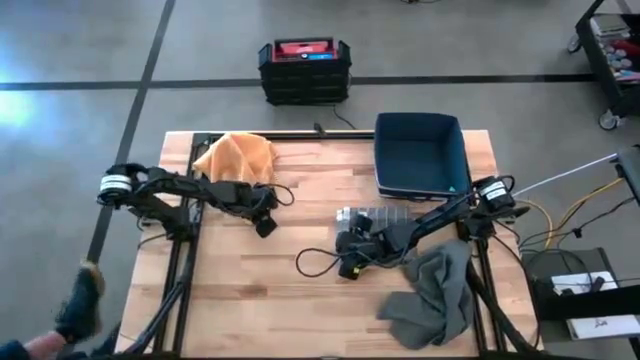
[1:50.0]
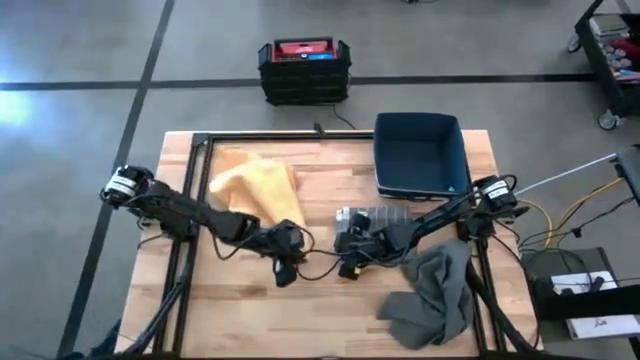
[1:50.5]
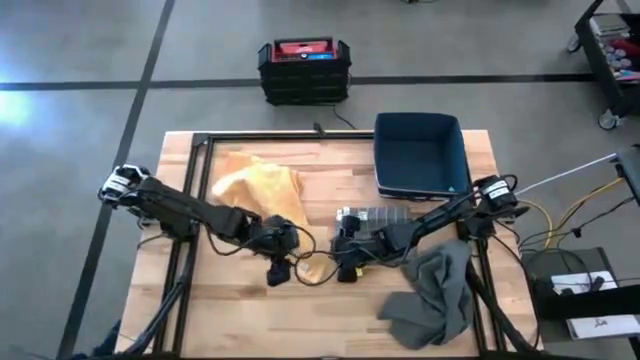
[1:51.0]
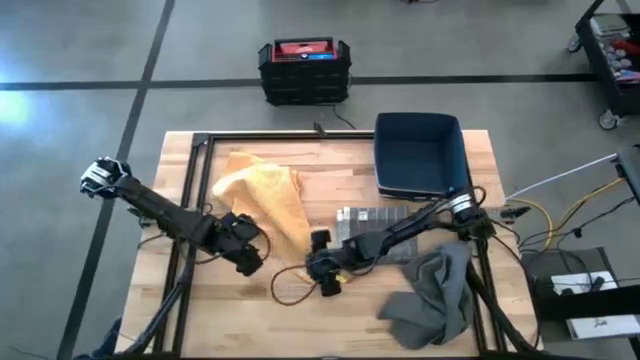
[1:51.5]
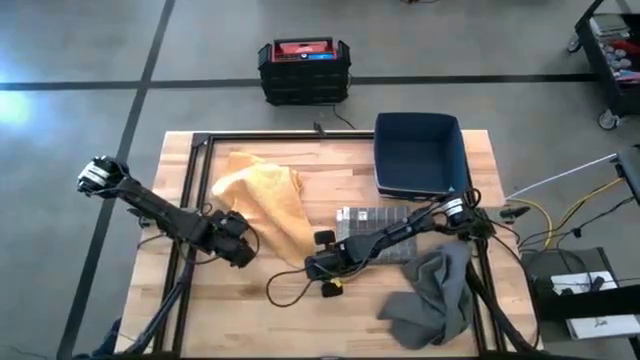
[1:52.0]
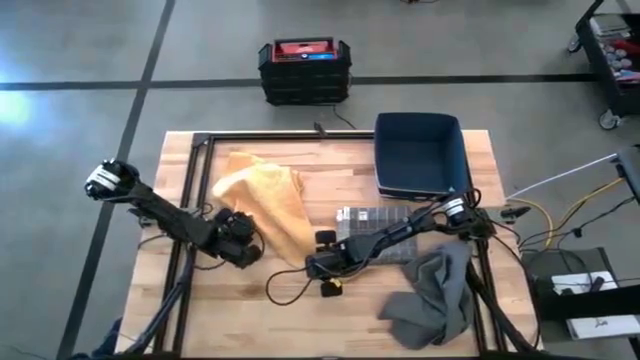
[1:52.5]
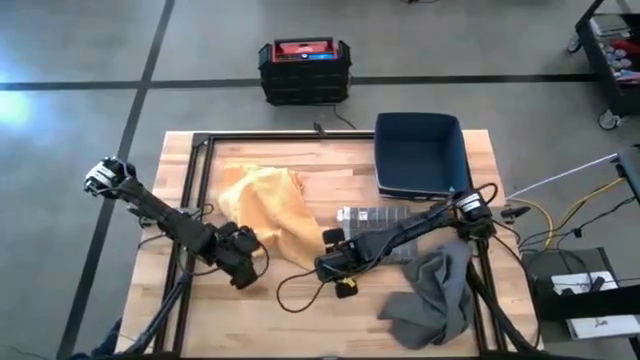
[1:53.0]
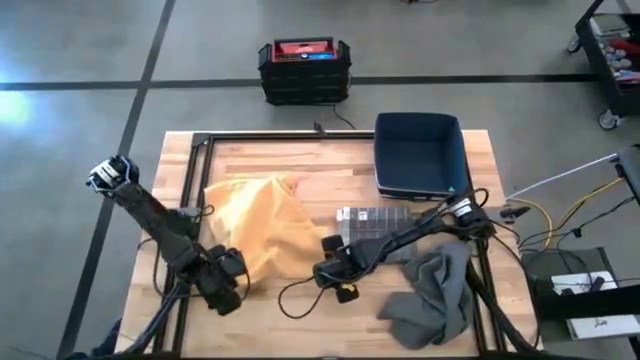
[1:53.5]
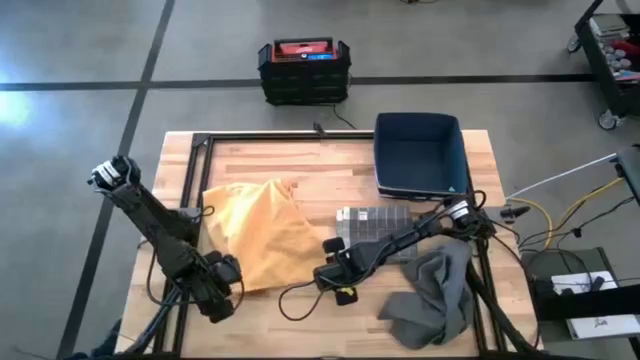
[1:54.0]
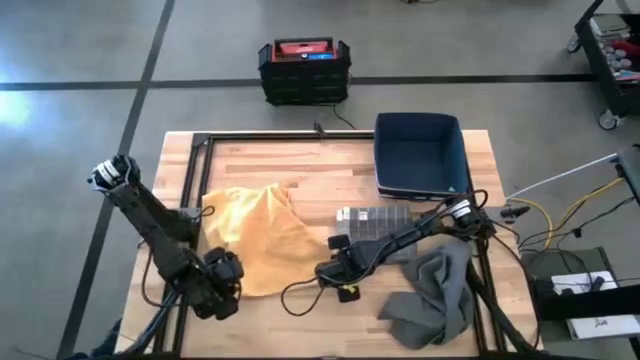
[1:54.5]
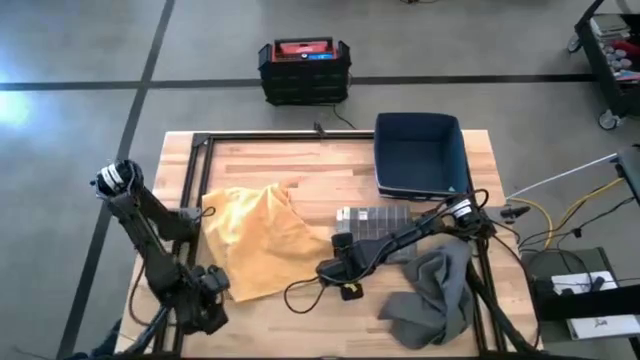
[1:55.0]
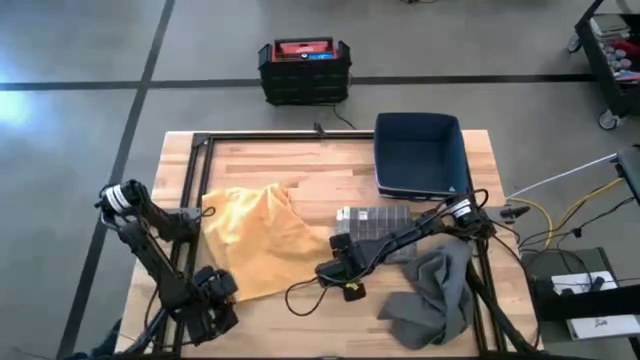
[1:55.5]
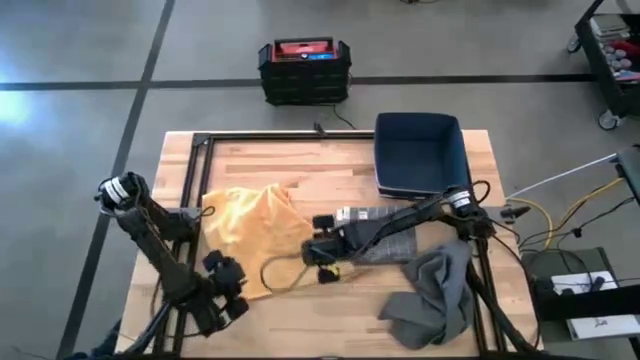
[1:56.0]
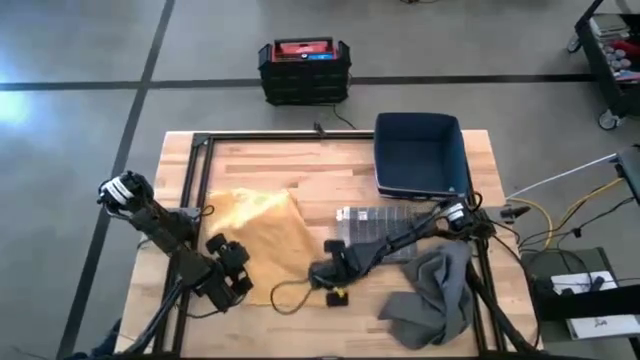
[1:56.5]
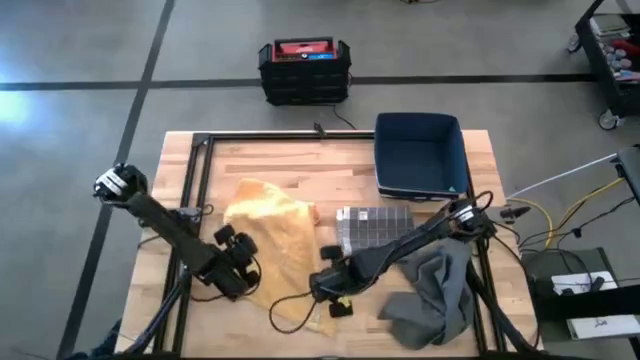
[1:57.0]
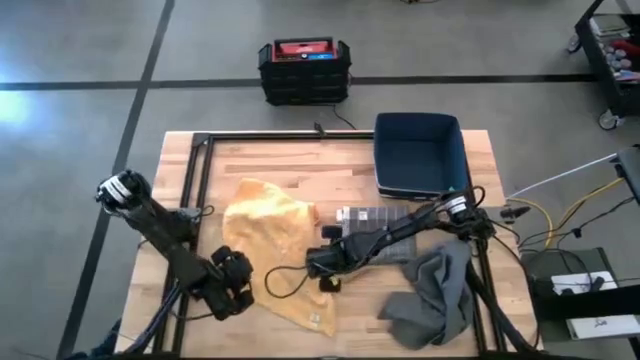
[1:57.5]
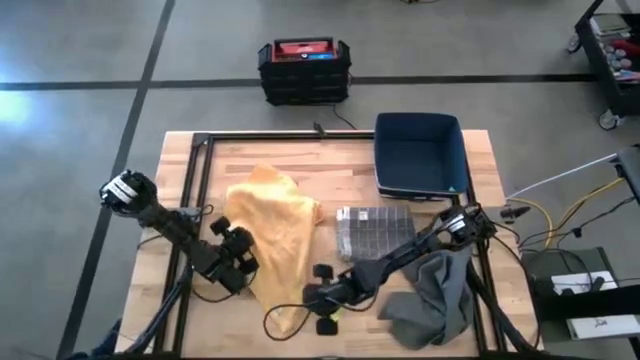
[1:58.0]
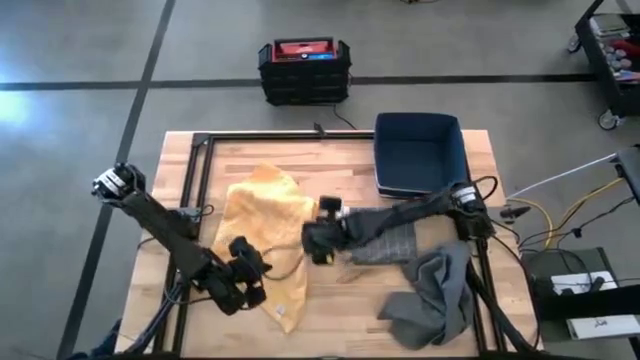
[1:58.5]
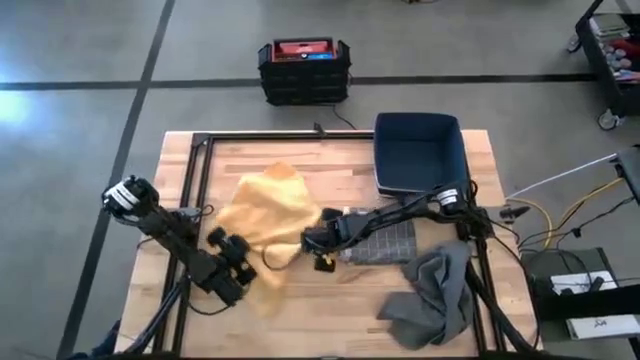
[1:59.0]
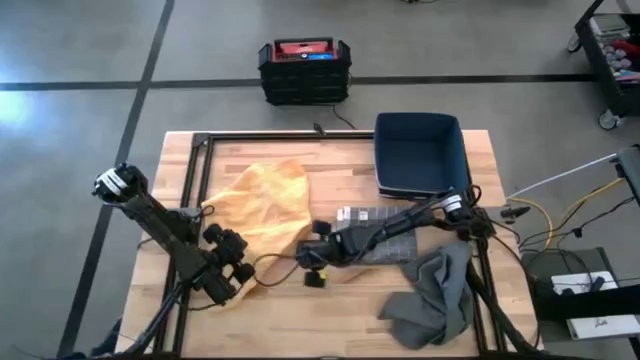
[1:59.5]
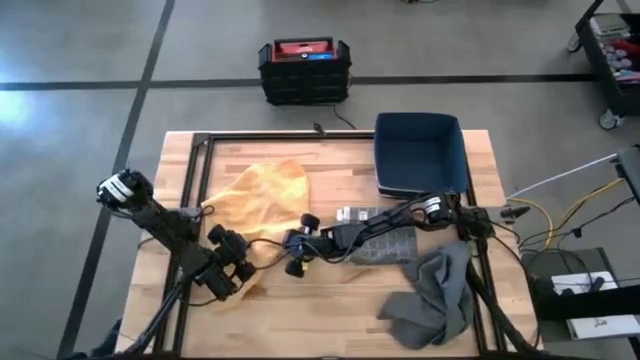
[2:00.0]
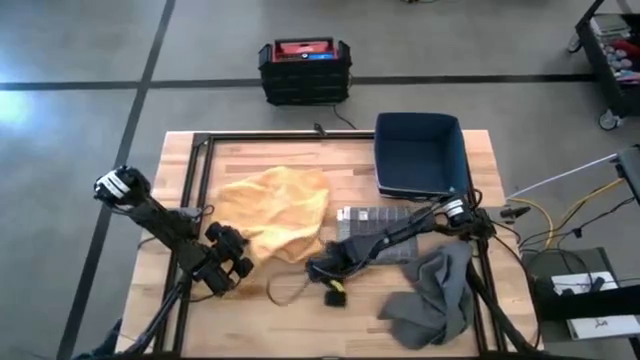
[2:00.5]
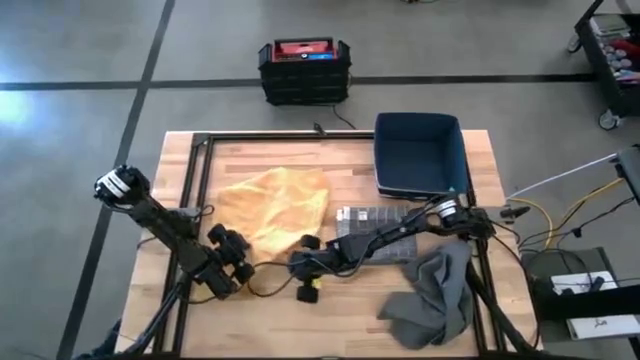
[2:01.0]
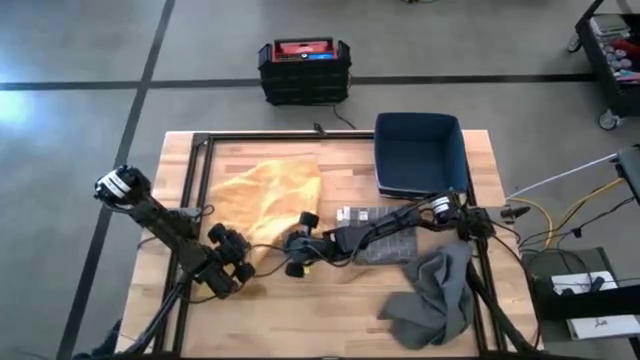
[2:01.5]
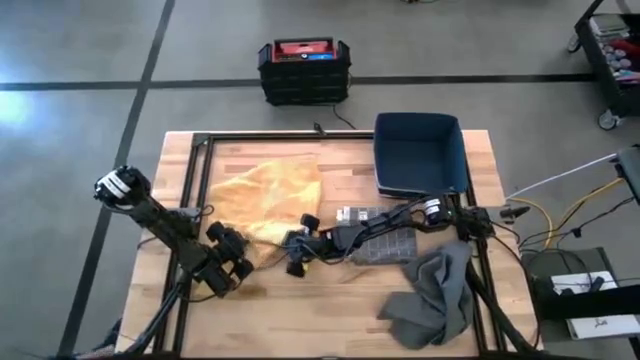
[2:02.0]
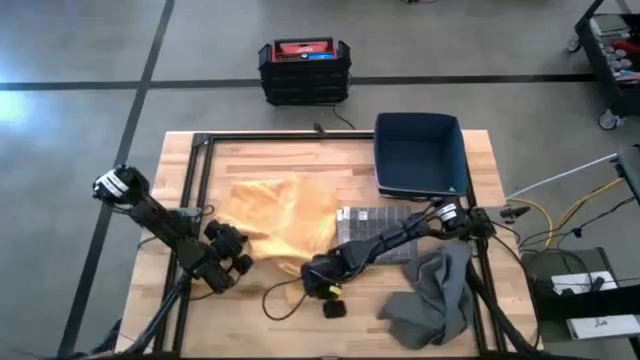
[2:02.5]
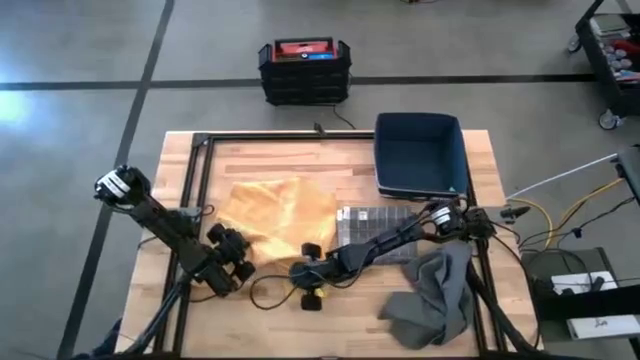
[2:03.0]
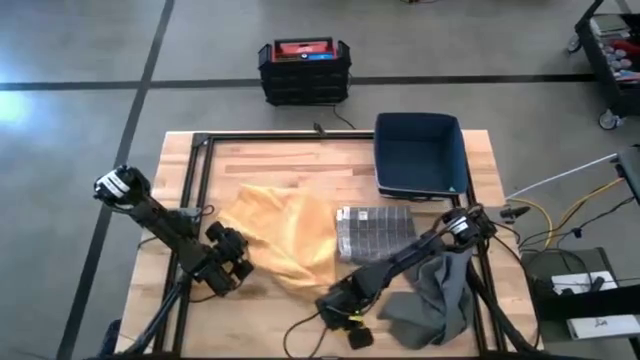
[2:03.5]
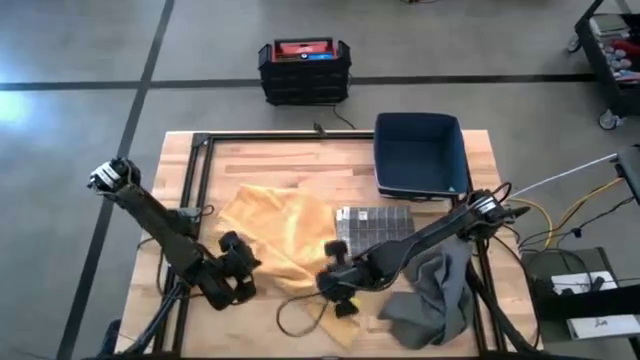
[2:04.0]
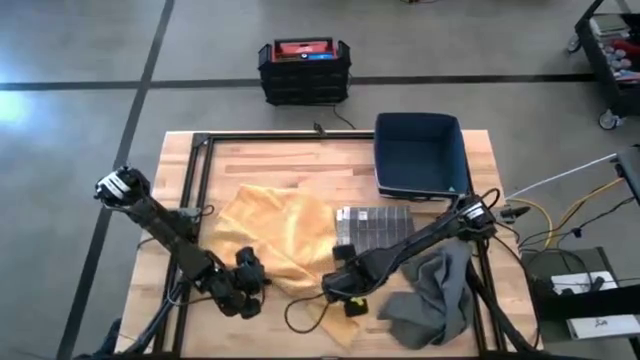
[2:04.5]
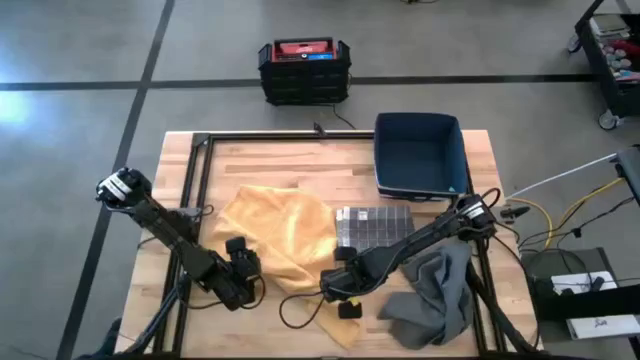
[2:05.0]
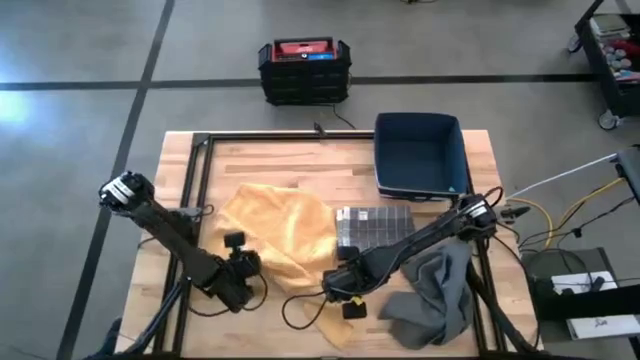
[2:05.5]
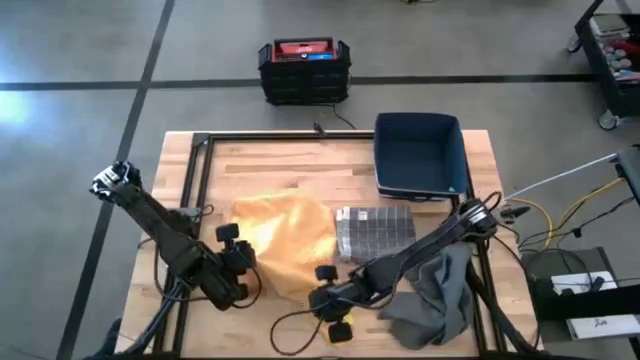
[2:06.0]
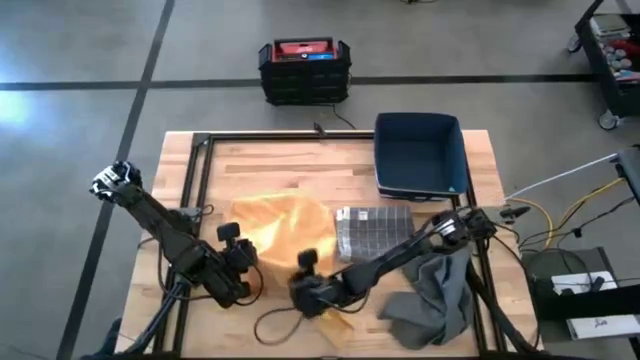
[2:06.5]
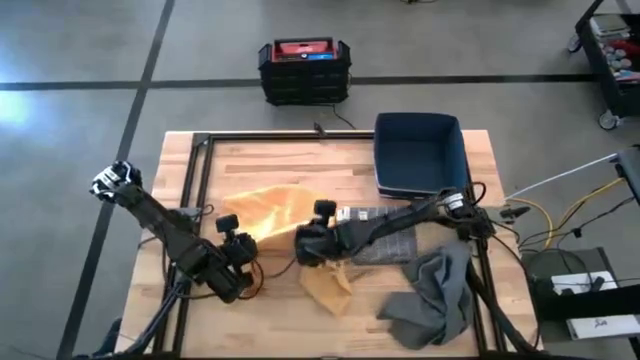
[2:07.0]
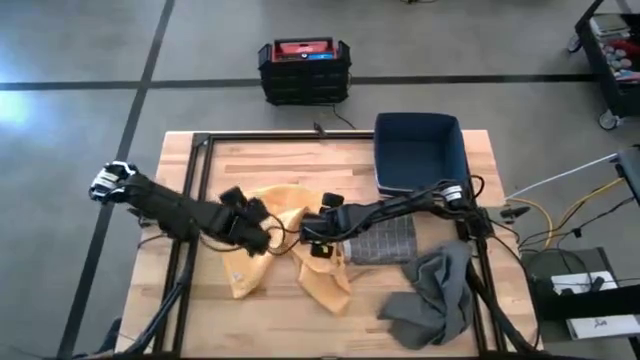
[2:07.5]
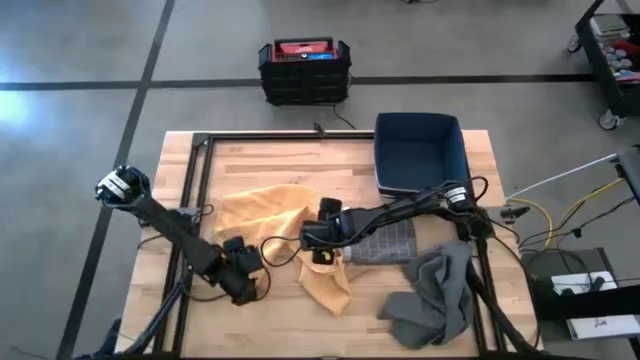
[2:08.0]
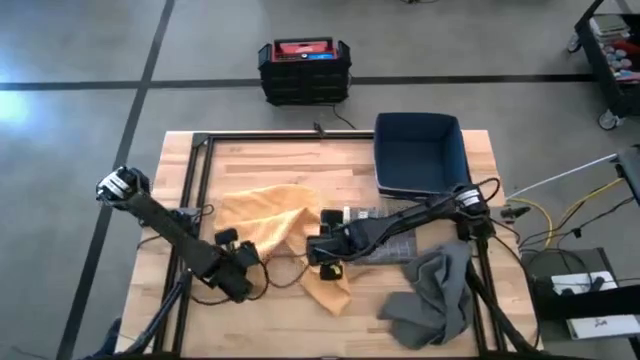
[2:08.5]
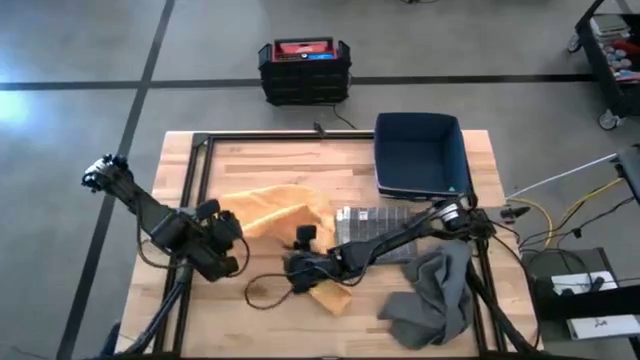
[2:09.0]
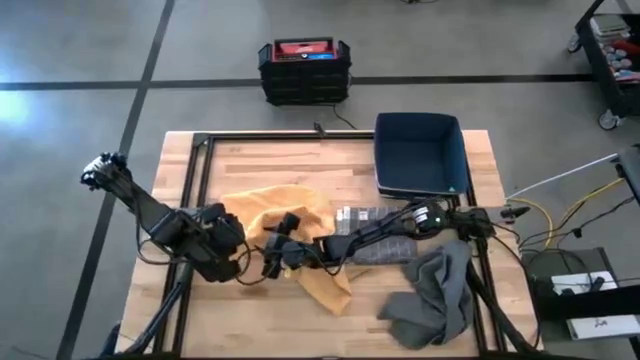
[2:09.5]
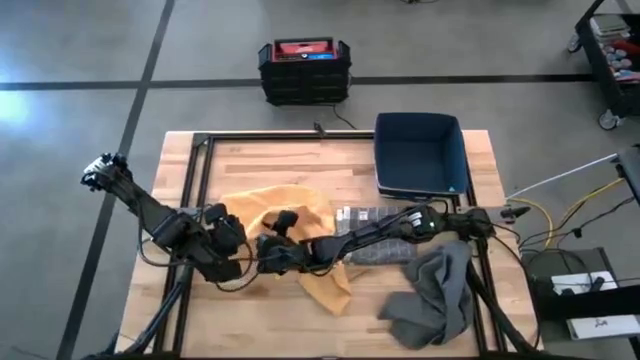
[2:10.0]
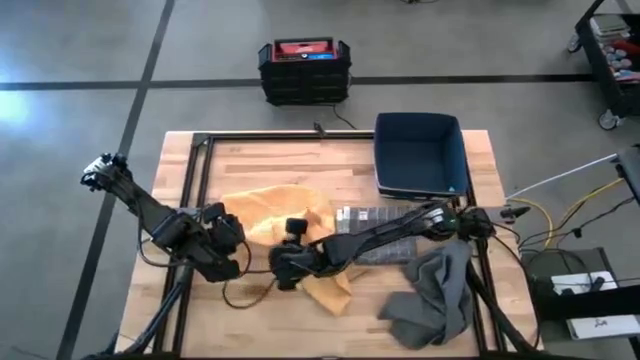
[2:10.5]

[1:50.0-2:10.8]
Task: Fold towel
Fold the yellow kitchen towel

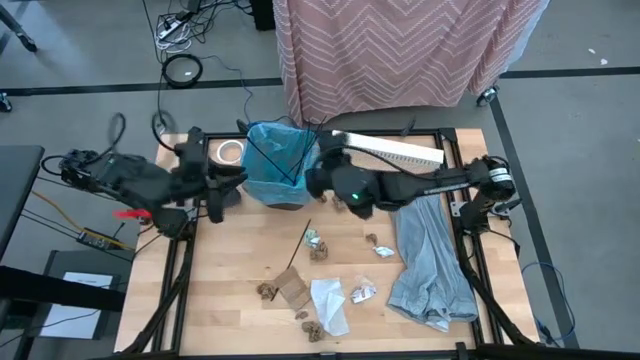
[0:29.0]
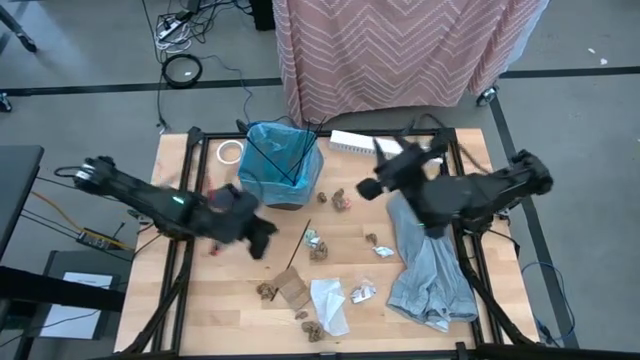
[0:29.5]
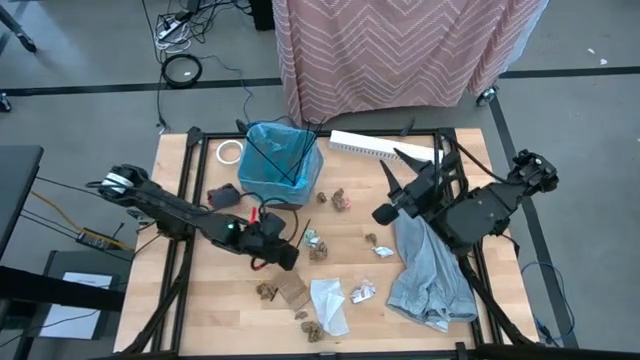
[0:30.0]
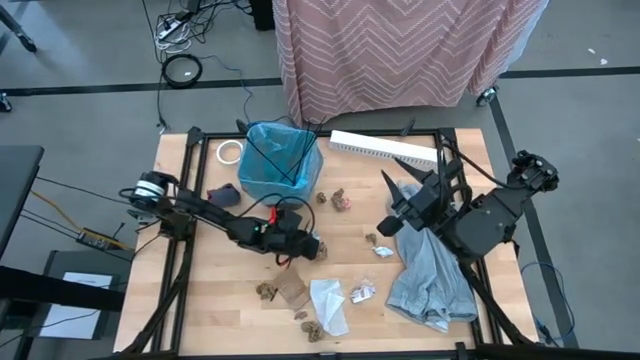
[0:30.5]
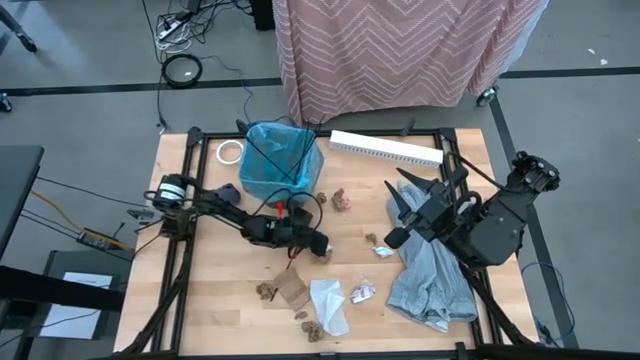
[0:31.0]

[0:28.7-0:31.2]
Task: place trash/remove bag and relplace
Put the black zip tie into the black trash bin
